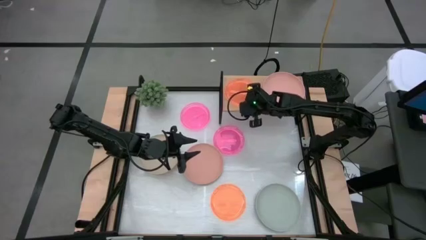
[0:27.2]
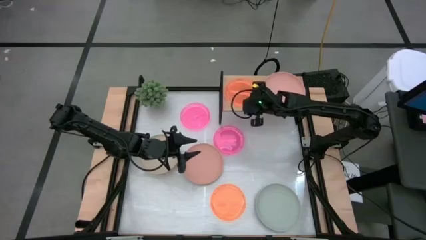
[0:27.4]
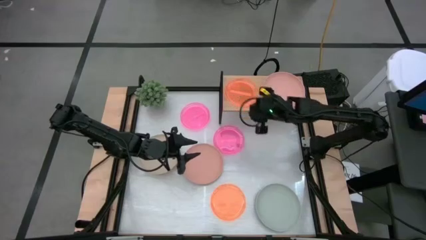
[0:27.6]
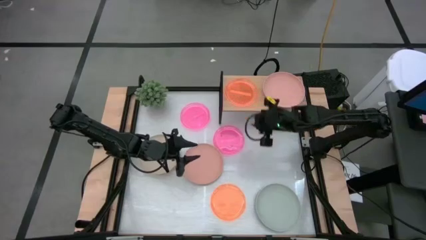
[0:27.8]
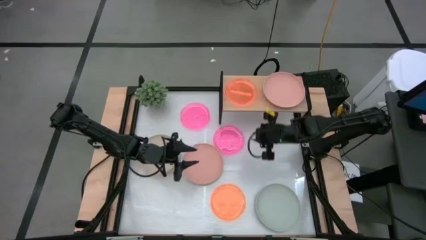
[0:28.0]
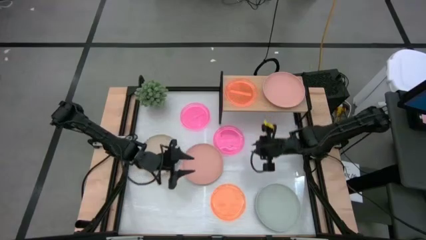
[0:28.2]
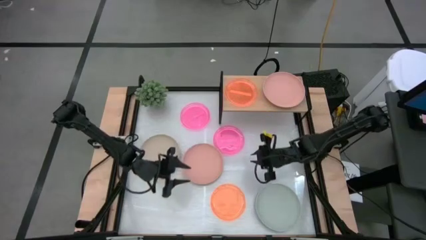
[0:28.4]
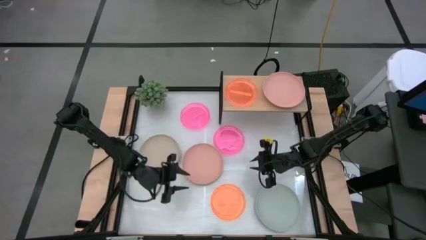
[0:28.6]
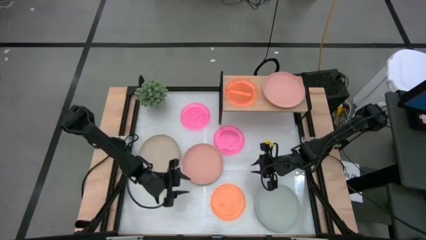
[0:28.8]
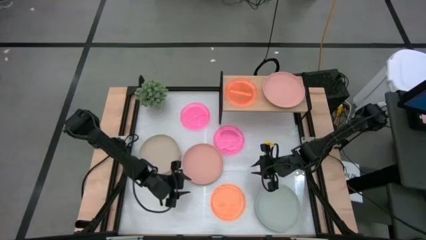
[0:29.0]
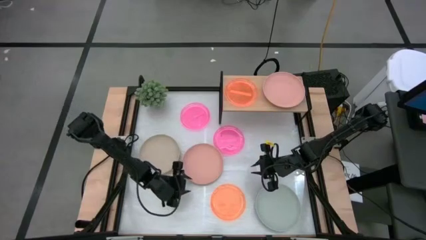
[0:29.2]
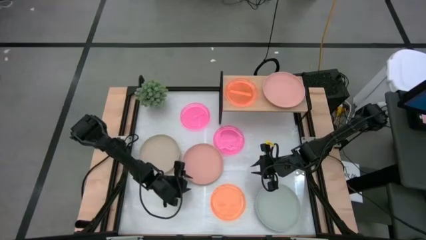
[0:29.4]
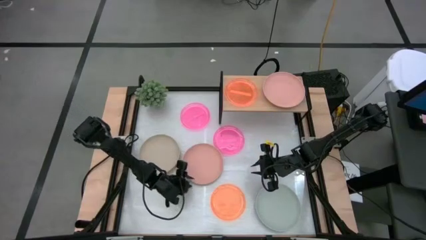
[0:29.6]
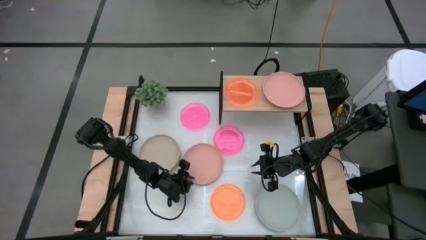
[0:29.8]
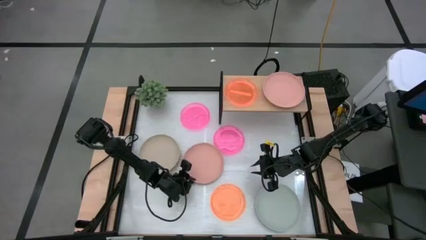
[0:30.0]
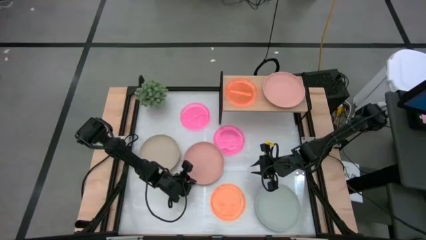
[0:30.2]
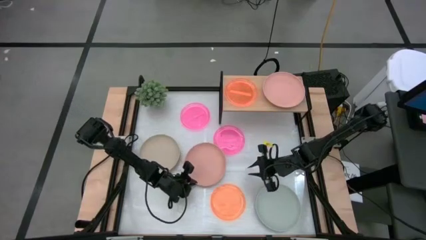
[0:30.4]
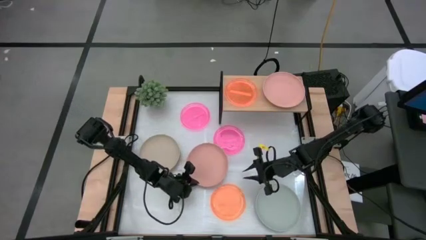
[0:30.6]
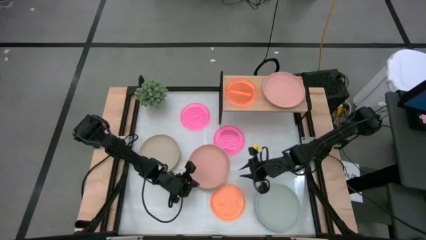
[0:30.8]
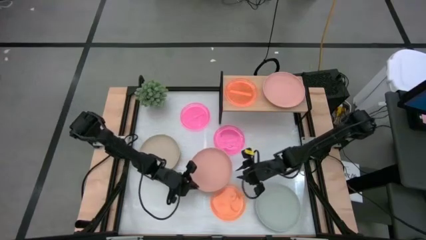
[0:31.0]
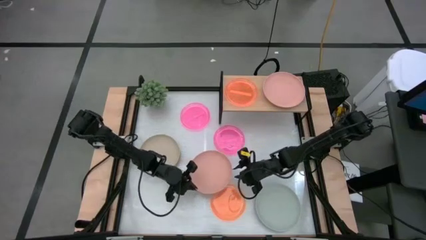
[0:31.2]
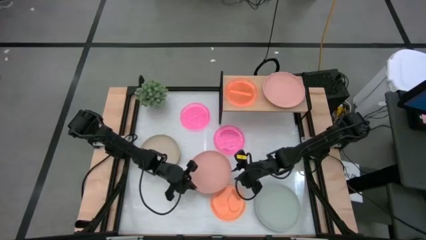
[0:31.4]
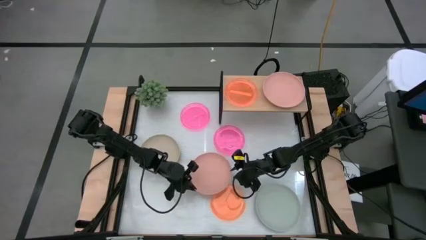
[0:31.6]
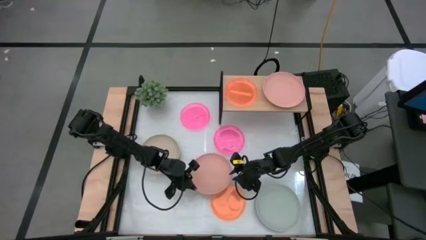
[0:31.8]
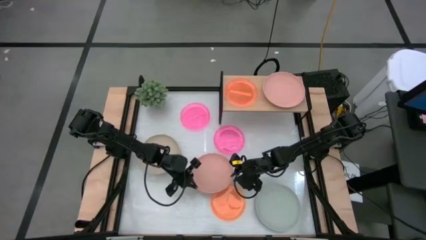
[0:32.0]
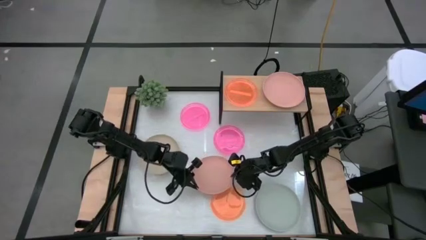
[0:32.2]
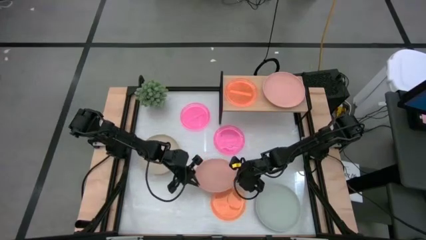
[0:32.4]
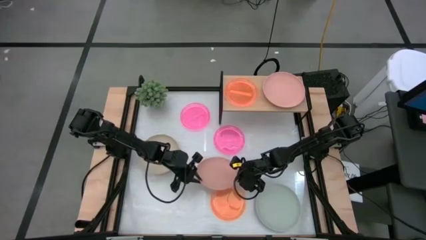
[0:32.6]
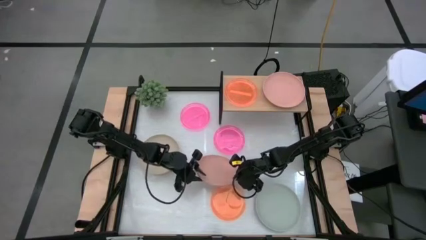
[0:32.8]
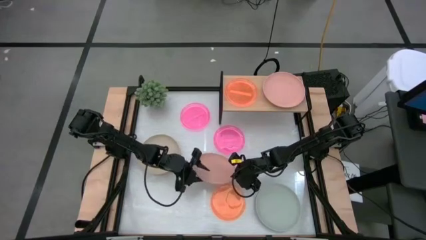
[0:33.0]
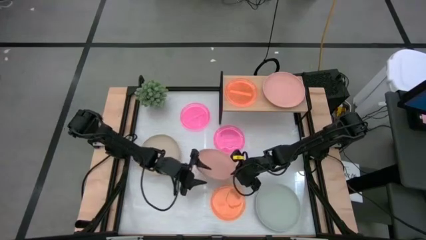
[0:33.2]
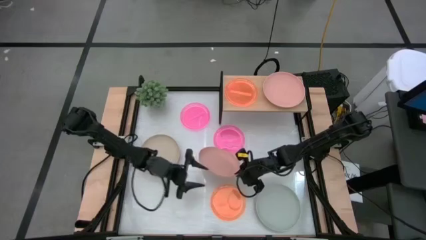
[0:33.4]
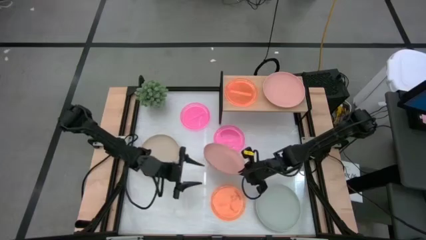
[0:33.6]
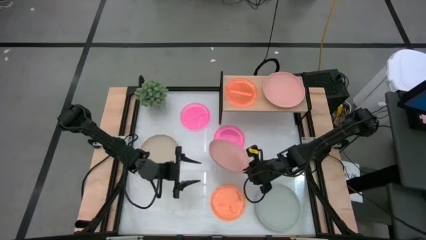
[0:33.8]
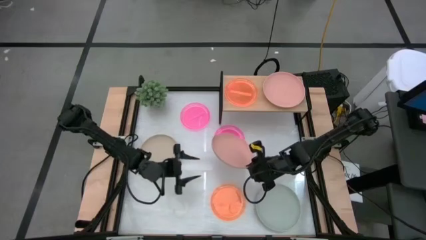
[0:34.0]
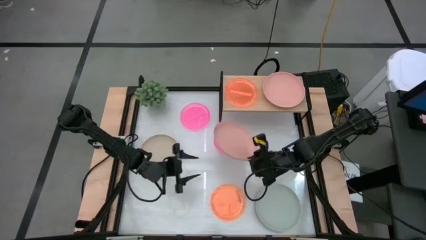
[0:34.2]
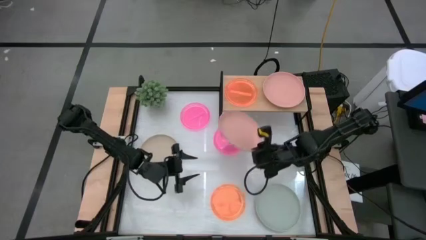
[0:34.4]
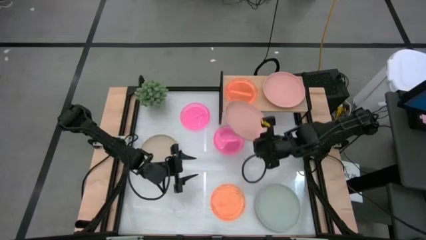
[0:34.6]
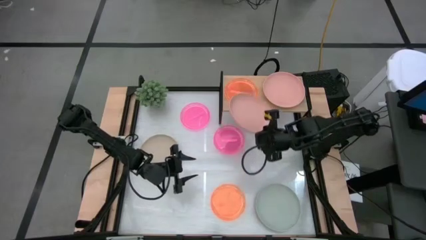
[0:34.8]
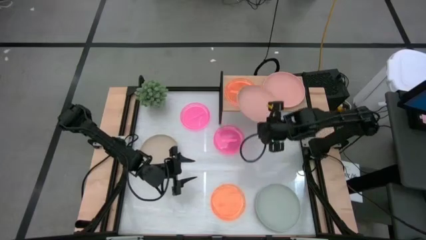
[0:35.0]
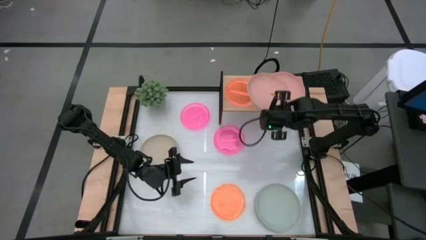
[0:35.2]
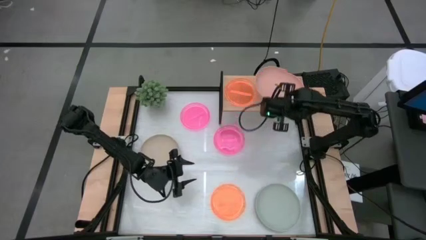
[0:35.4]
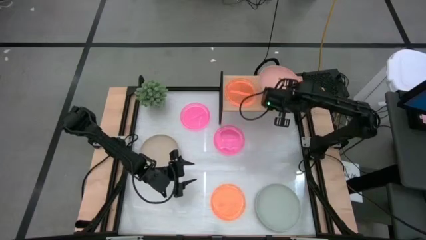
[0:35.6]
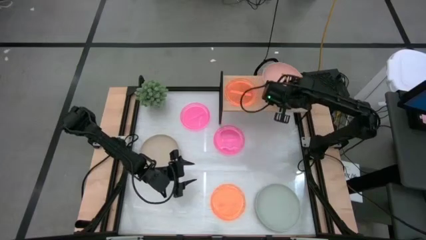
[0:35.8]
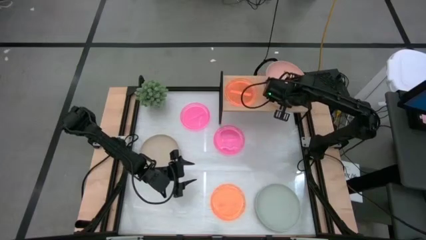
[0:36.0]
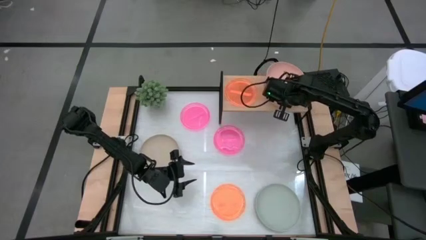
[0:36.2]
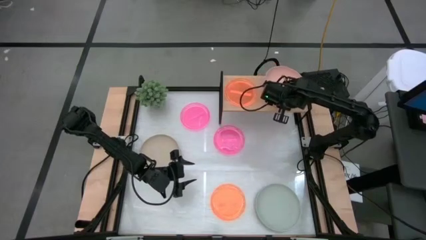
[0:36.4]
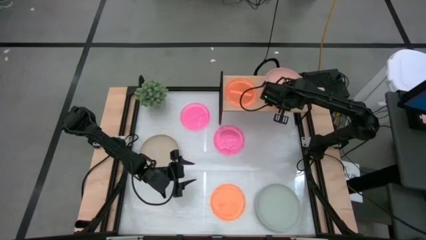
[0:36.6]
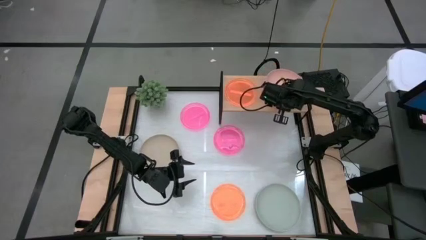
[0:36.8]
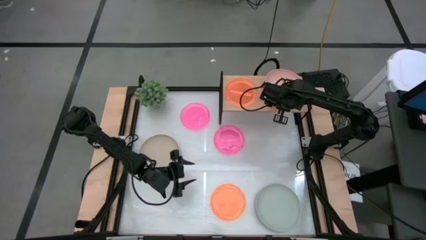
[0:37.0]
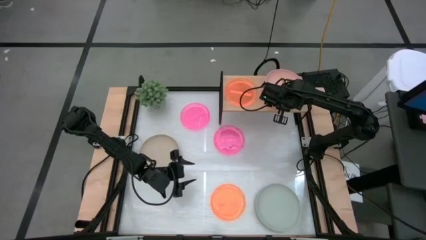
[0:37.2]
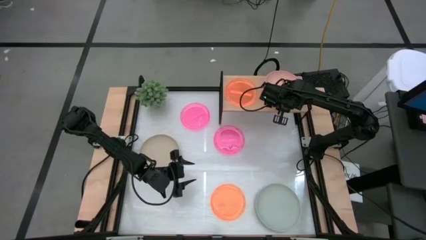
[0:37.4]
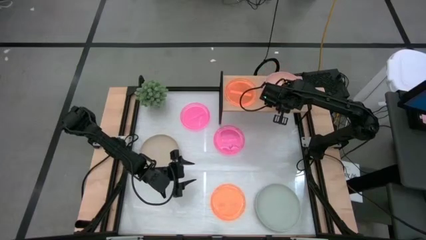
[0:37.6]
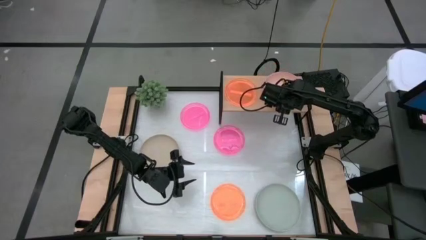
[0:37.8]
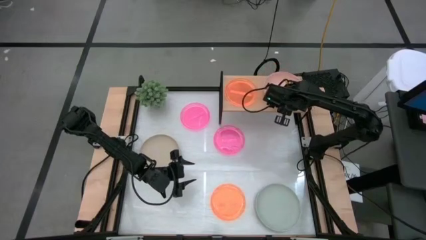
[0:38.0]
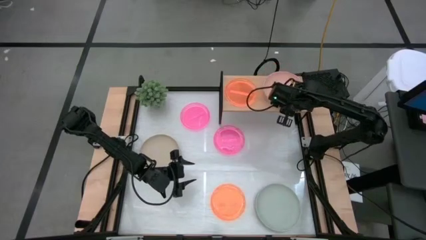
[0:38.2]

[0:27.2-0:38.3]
Task: Place and stack plates onto a shelf
Stack the light pink plate on top of the light pink plate on the shelf
